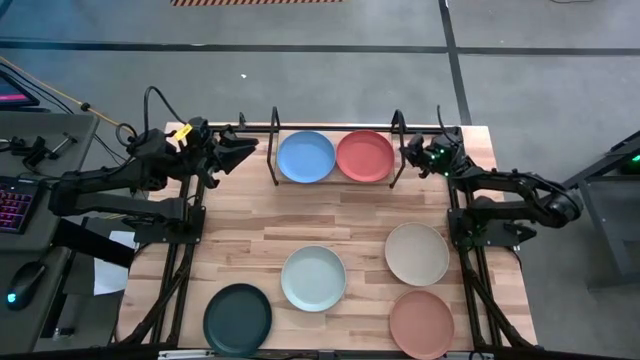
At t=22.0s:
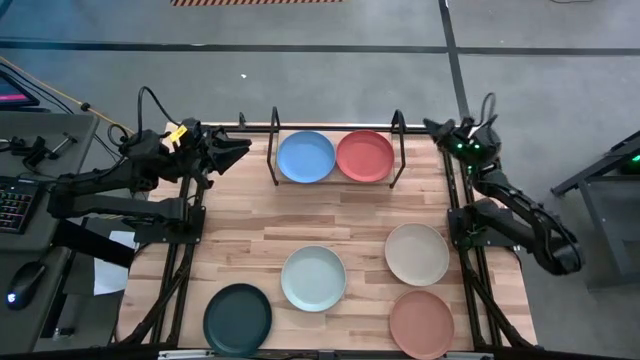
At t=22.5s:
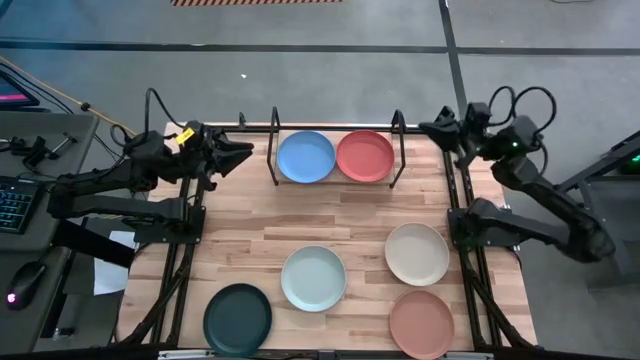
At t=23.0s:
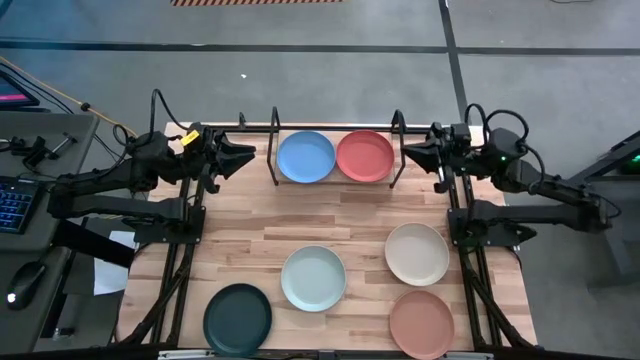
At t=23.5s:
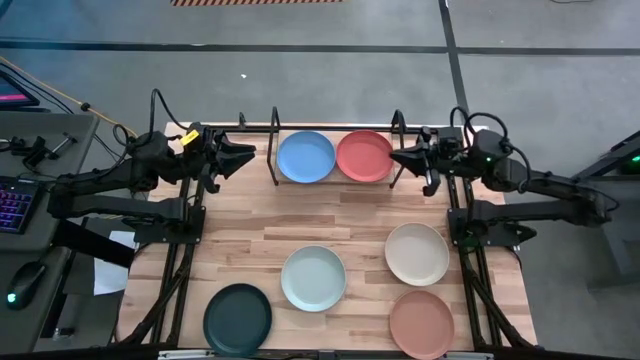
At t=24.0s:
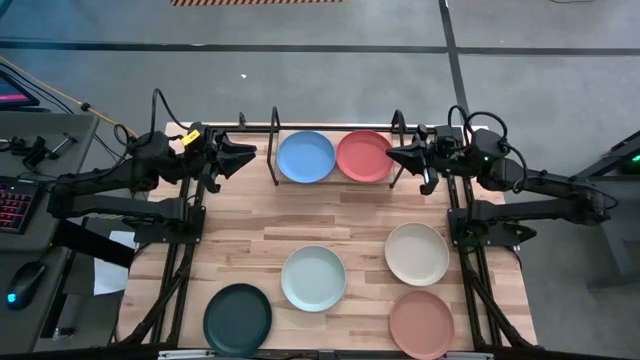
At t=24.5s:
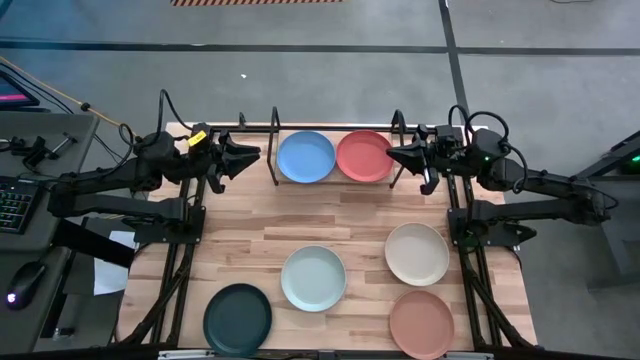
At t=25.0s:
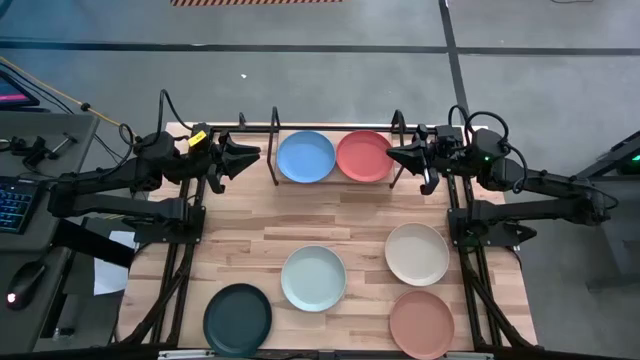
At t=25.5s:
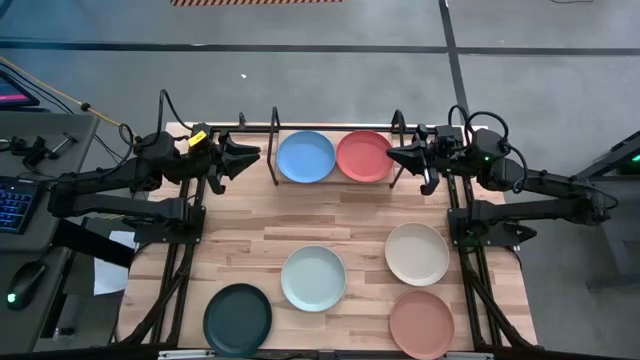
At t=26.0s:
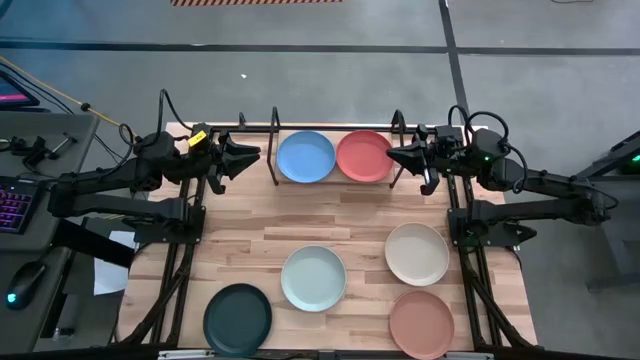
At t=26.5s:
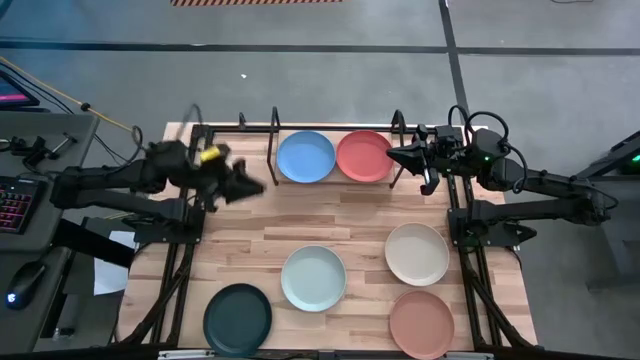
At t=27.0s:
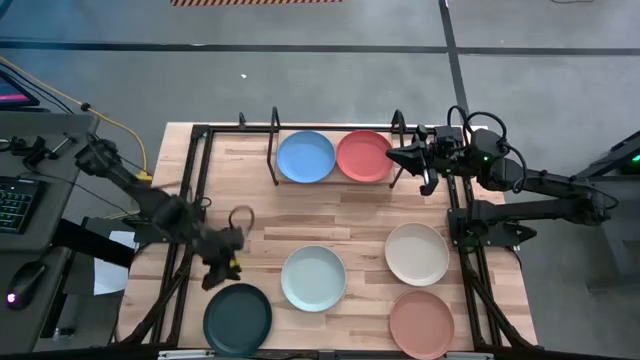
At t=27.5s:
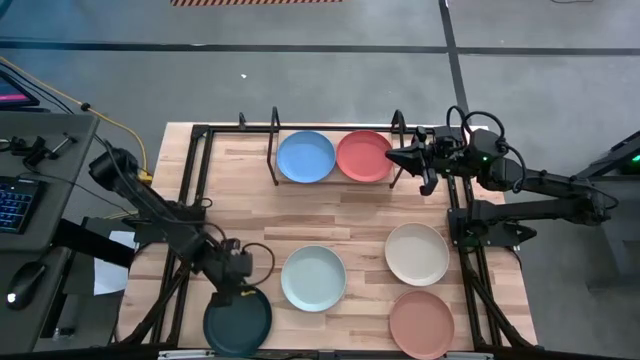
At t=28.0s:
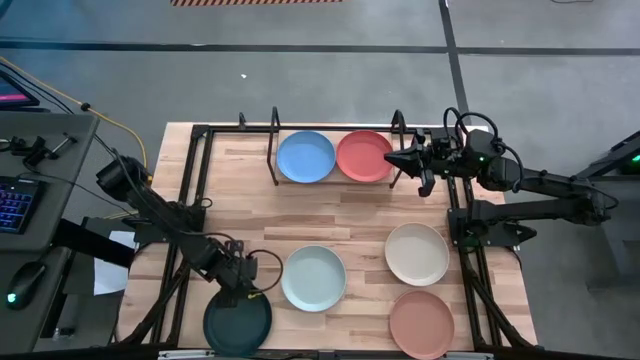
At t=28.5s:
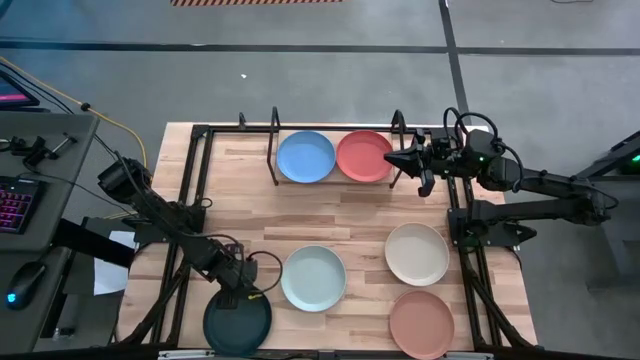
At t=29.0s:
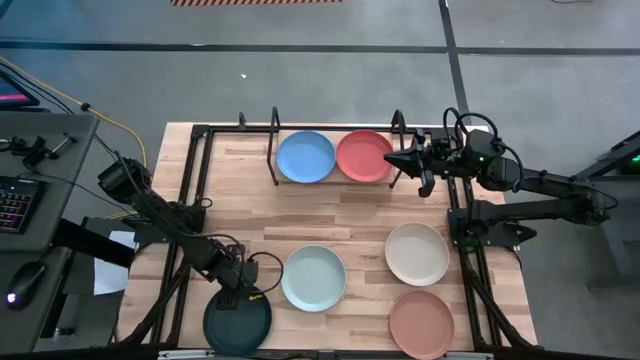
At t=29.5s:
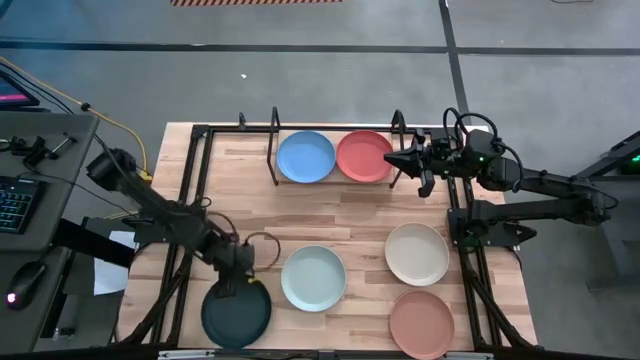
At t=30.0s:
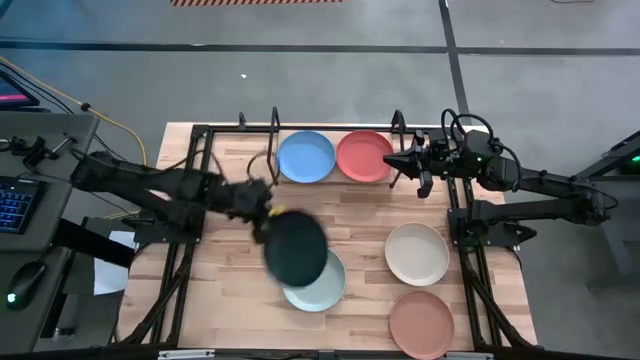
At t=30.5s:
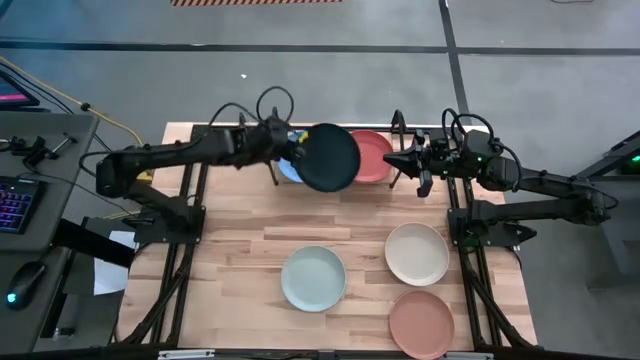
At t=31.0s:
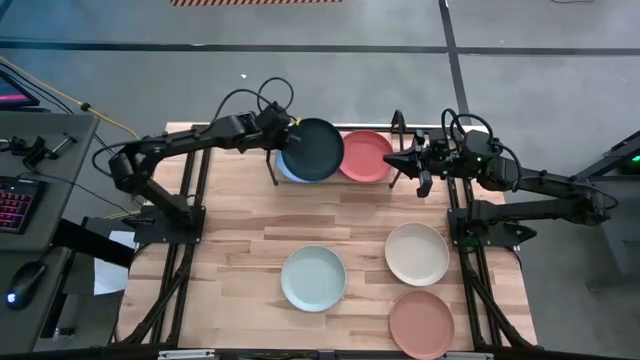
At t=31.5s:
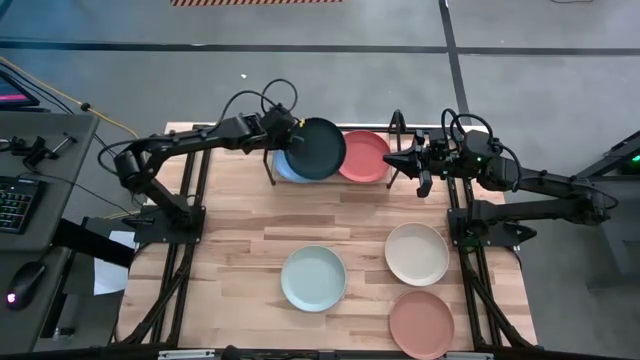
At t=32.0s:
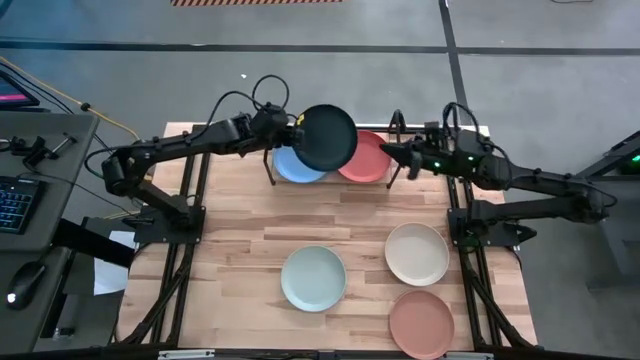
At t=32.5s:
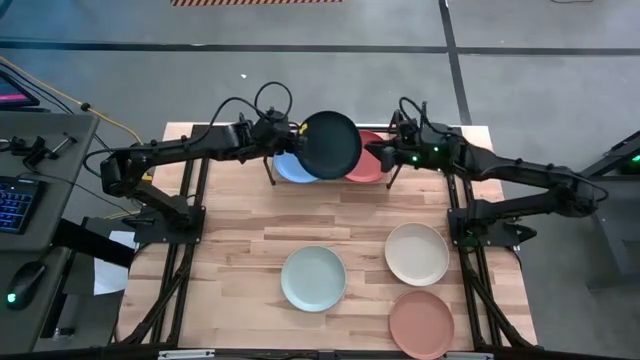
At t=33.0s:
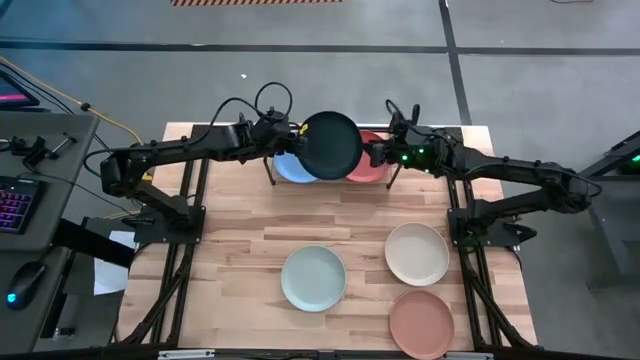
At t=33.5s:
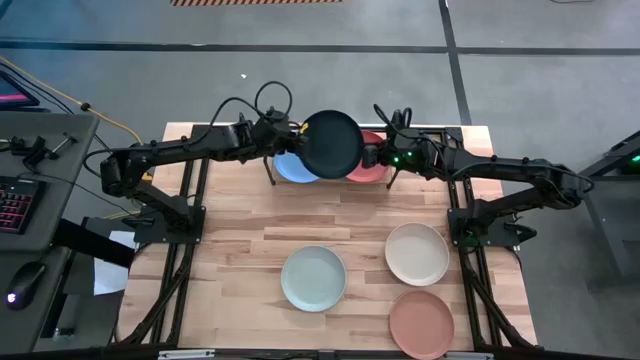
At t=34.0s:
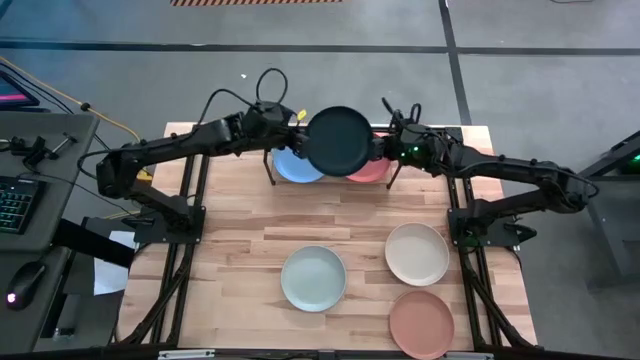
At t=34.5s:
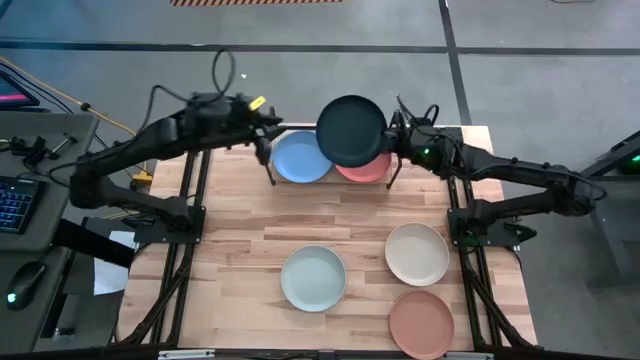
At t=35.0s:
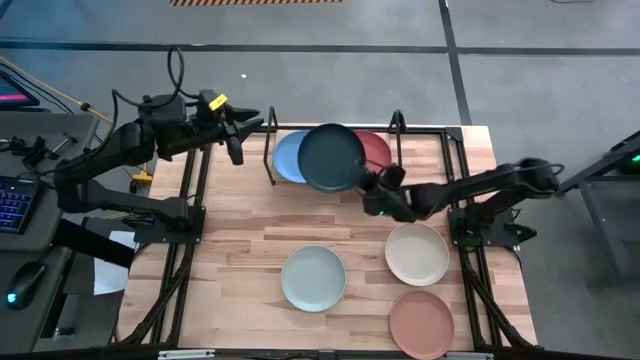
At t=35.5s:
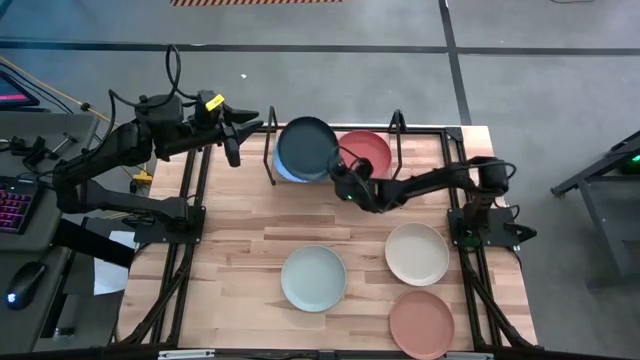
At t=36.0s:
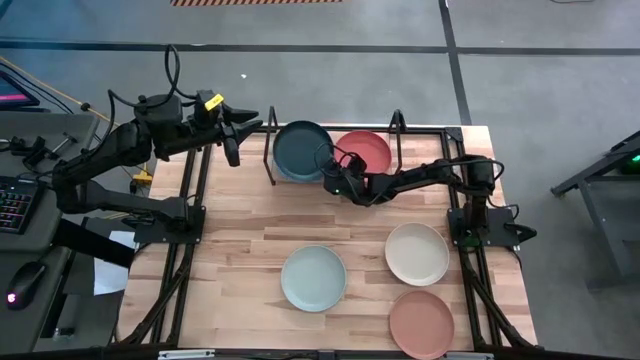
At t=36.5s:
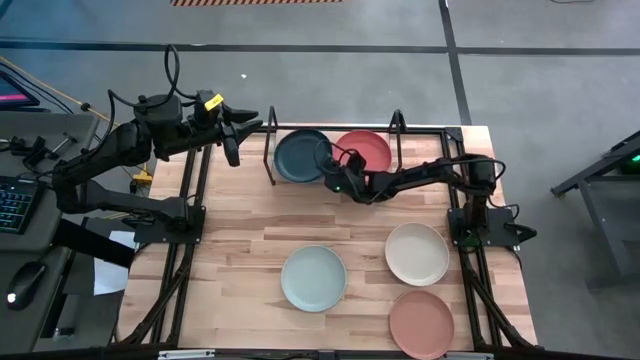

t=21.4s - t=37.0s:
Task: Place and stack plates onto a shelf
Stack the black plate on the blue plate on the shelf

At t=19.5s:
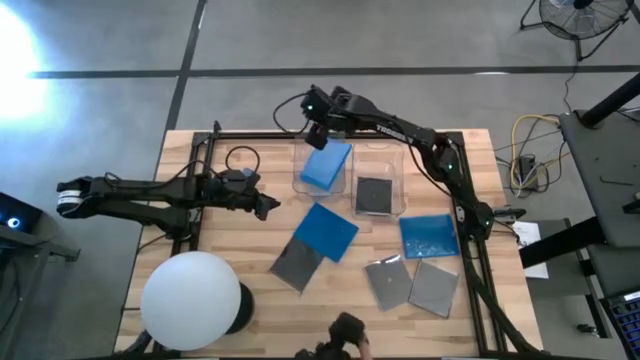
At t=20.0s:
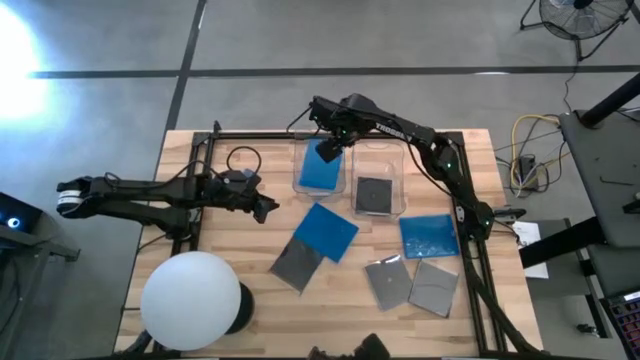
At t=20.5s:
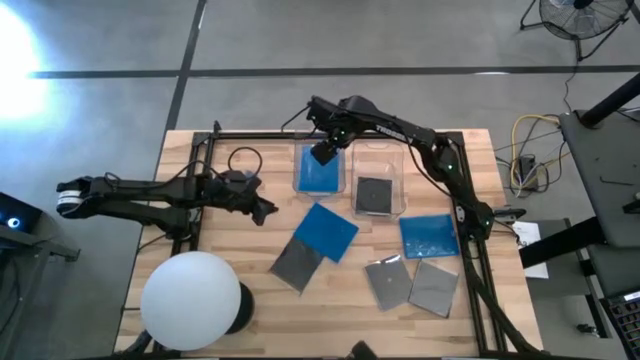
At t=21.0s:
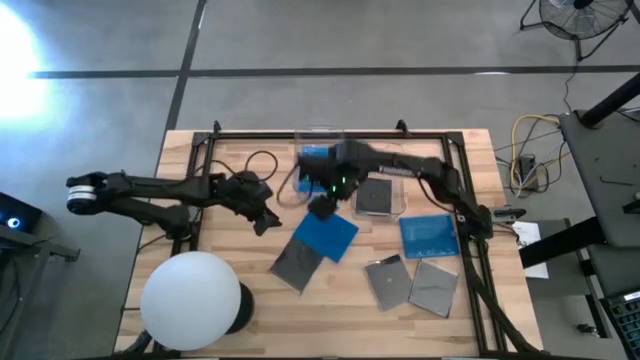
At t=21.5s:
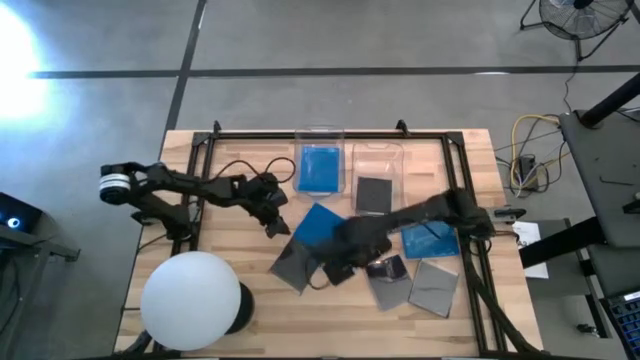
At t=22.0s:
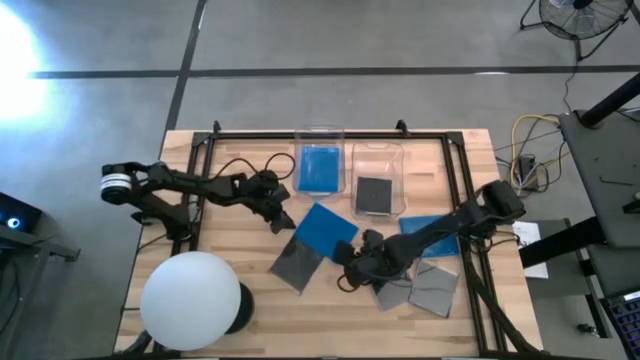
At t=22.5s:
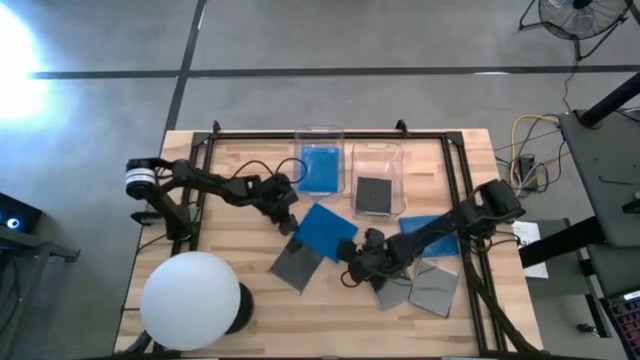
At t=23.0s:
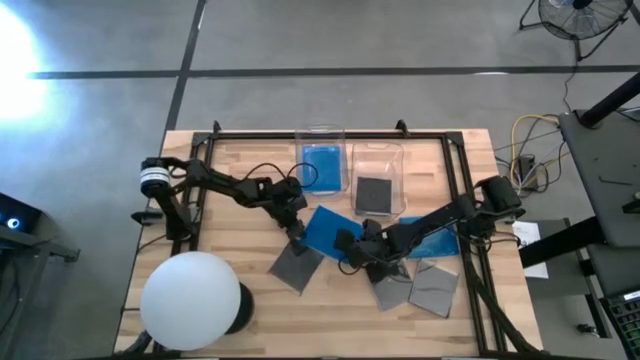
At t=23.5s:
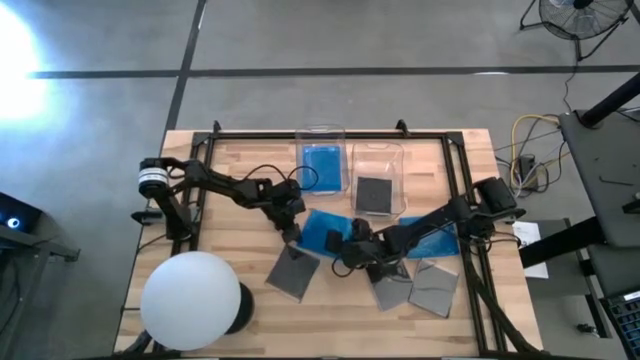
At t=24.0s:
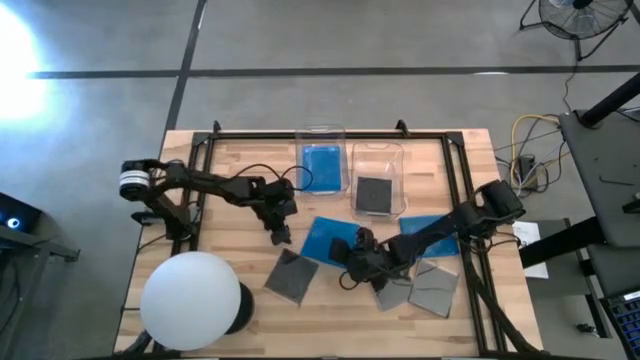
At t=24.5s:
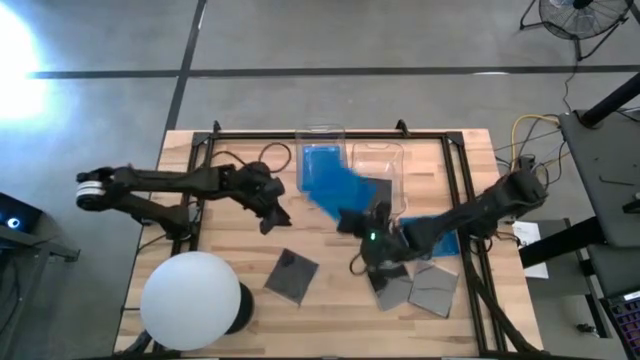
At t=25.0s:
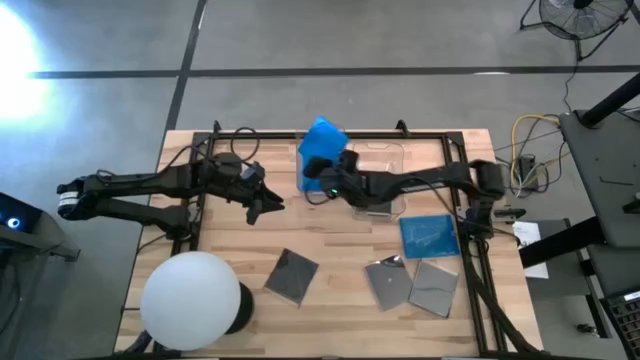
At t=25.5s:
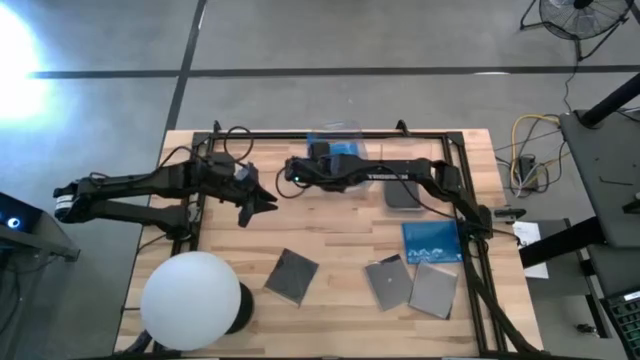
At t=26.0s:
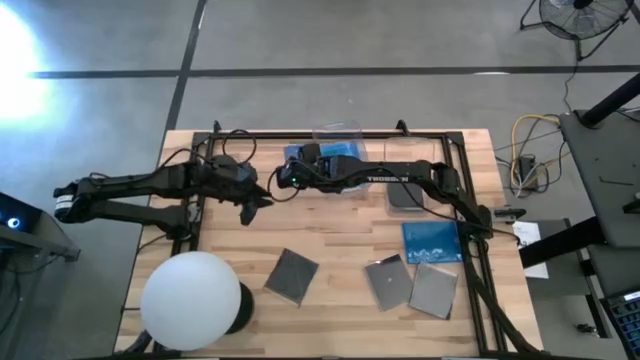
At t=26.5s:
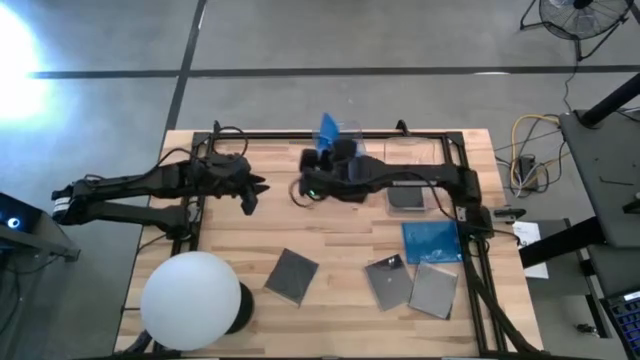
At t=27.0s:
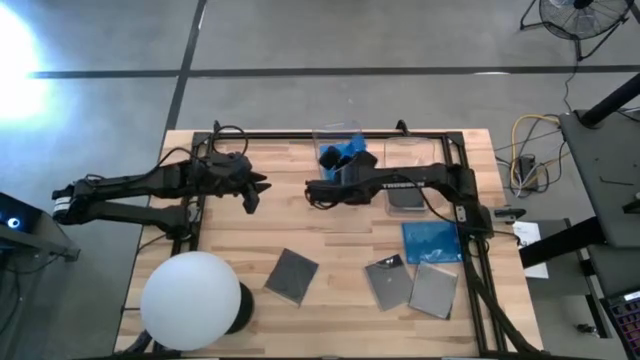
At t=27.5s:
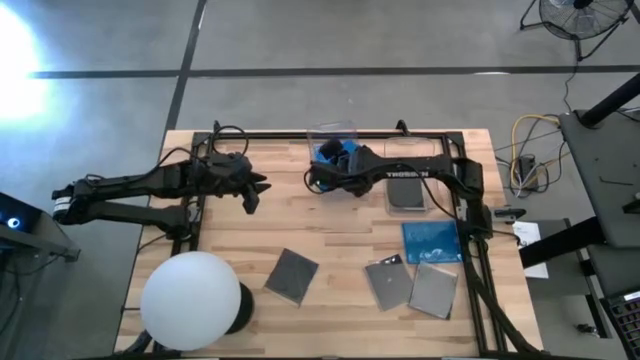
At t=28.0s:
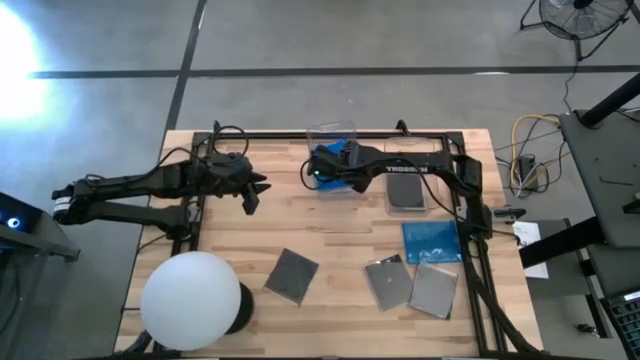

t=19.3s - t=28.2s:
Task: Pick & place jewel cases by type
Put the blue CD case into the left transparent bin
